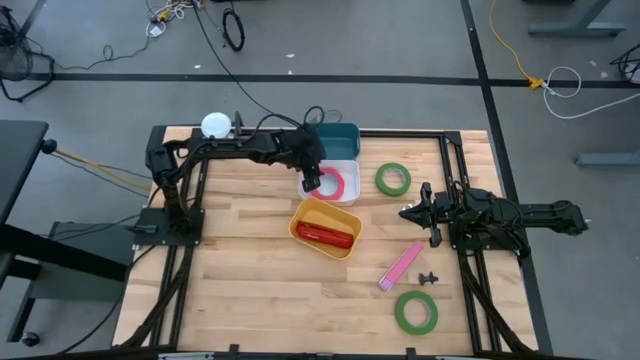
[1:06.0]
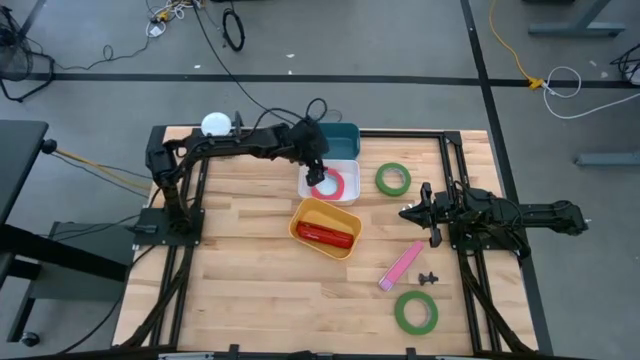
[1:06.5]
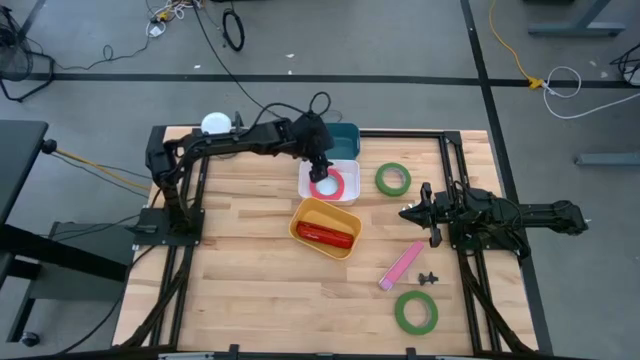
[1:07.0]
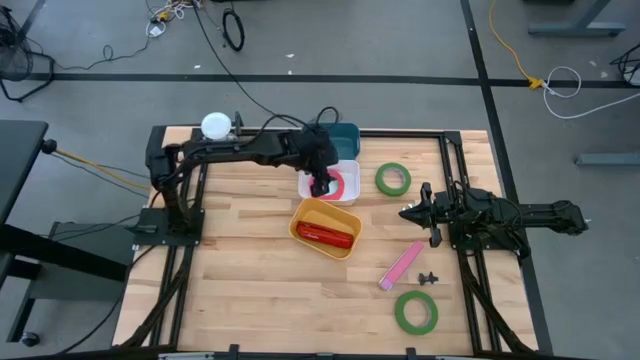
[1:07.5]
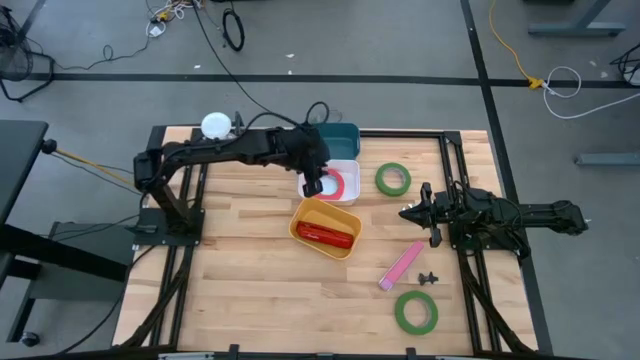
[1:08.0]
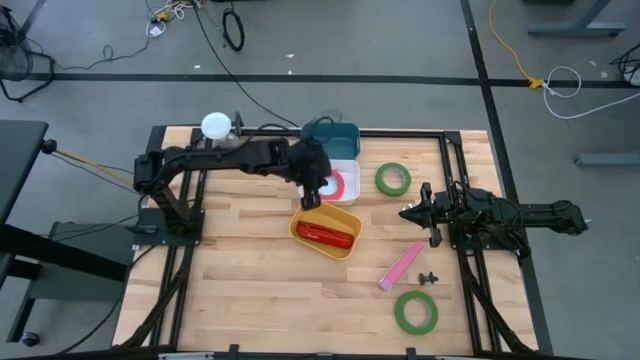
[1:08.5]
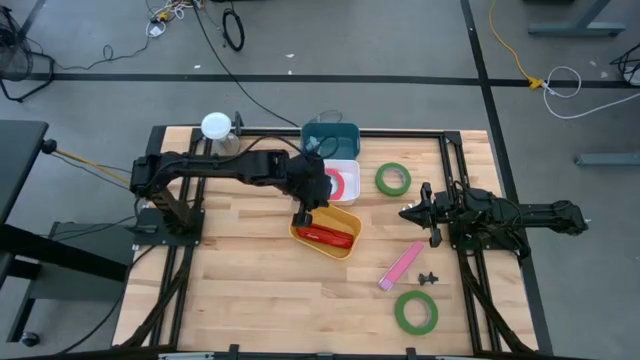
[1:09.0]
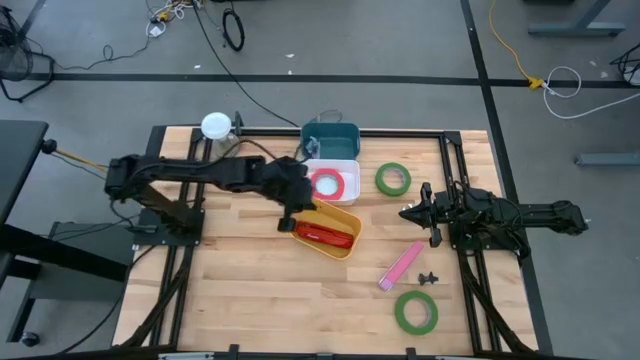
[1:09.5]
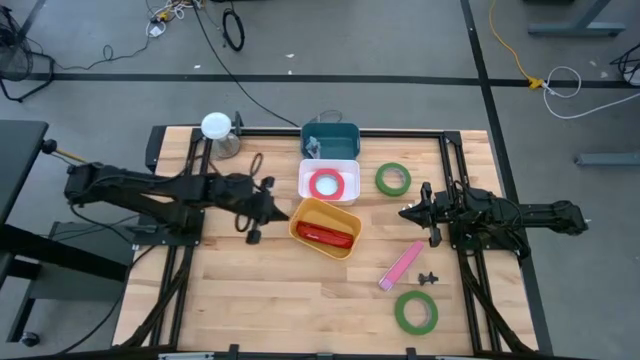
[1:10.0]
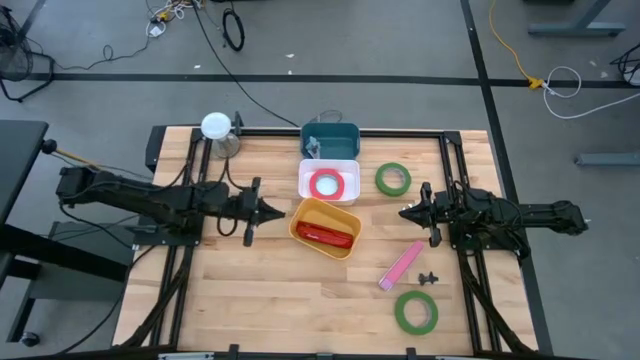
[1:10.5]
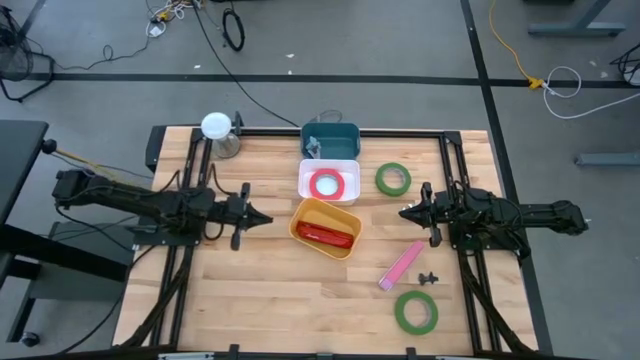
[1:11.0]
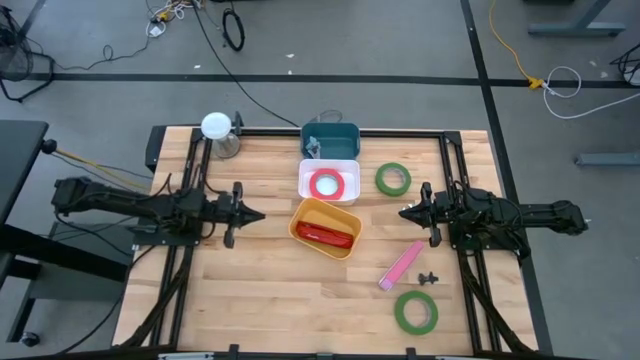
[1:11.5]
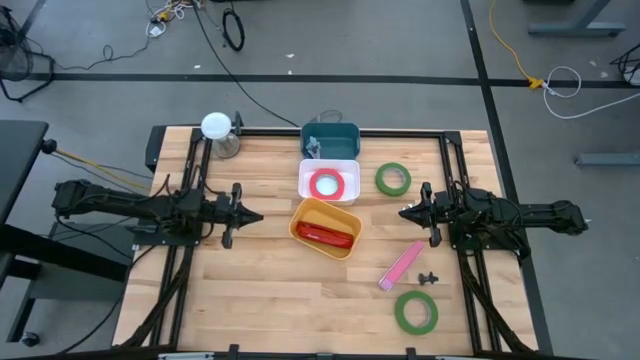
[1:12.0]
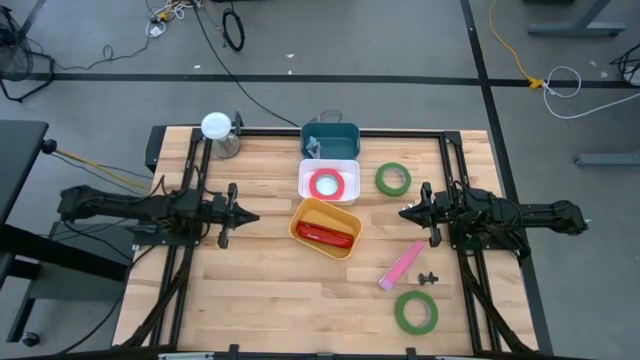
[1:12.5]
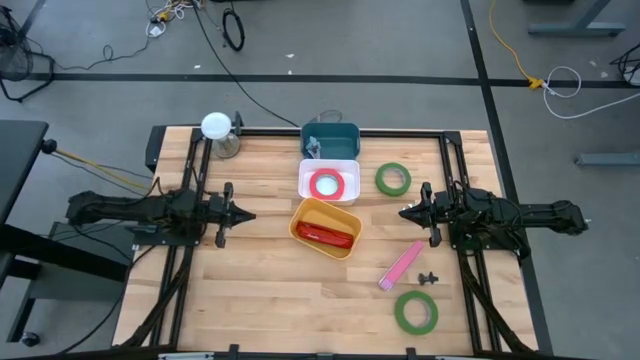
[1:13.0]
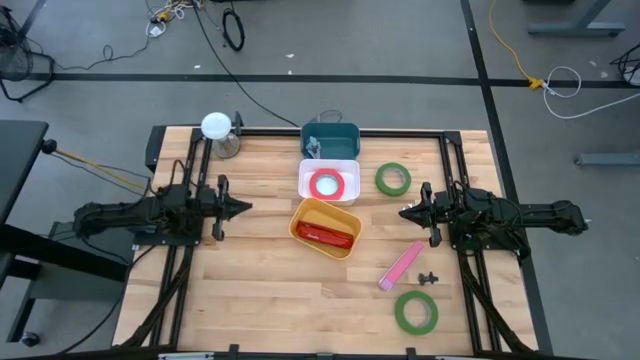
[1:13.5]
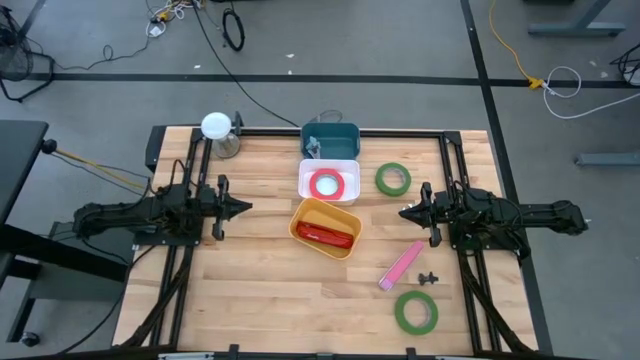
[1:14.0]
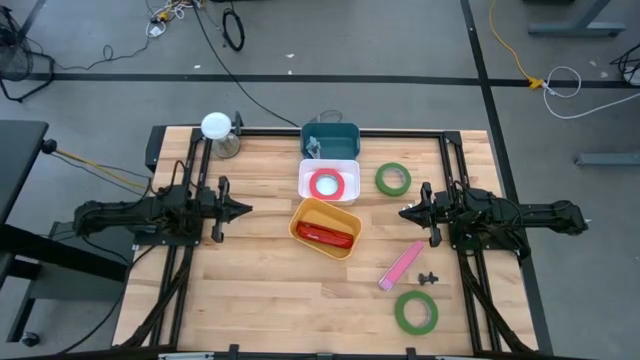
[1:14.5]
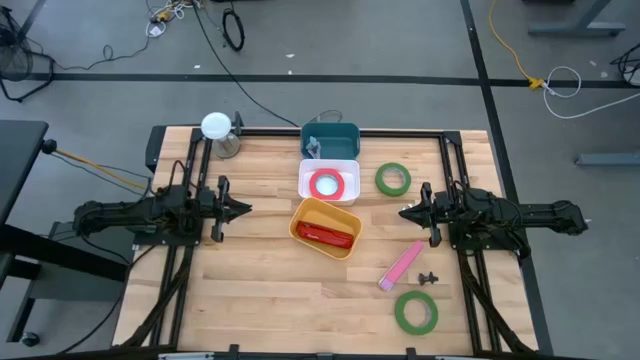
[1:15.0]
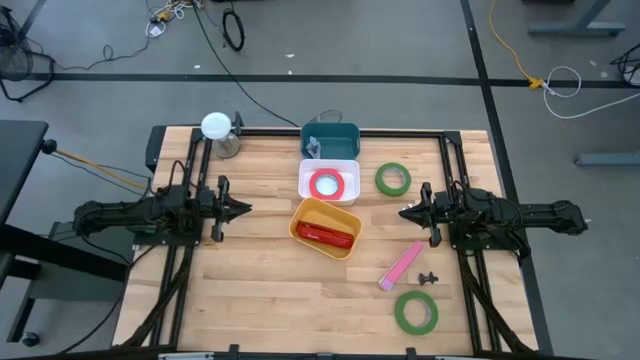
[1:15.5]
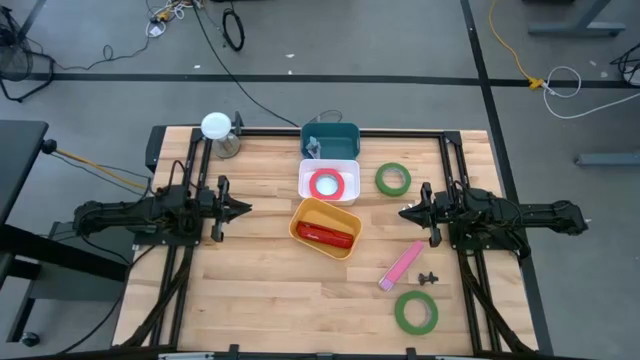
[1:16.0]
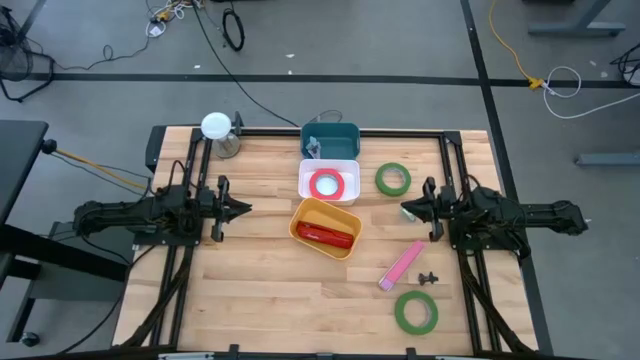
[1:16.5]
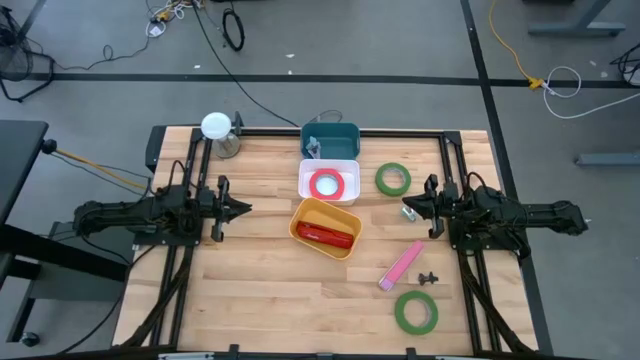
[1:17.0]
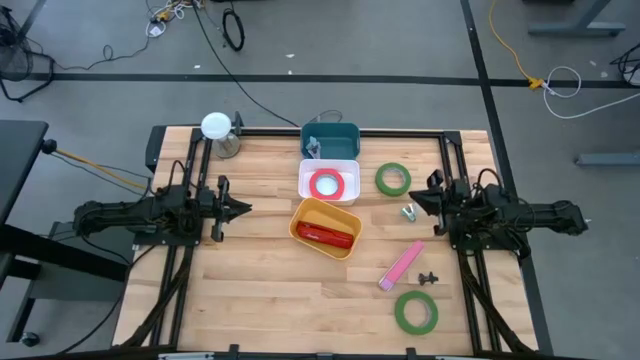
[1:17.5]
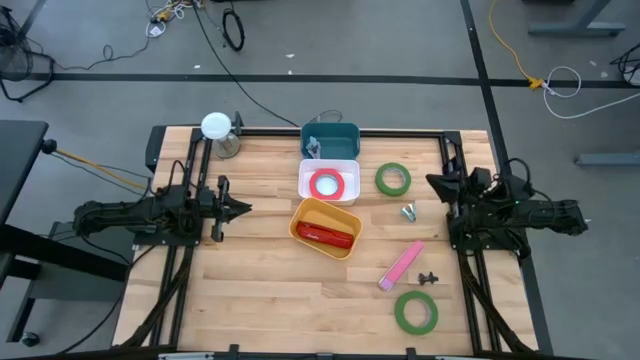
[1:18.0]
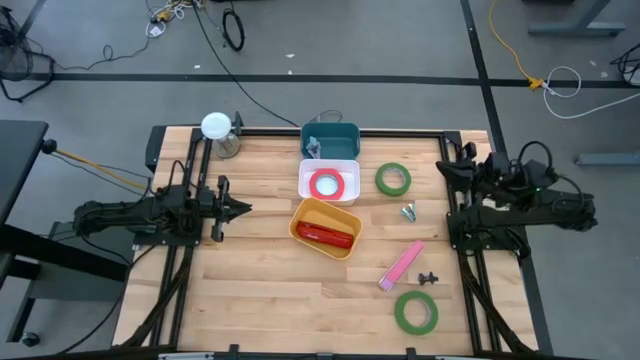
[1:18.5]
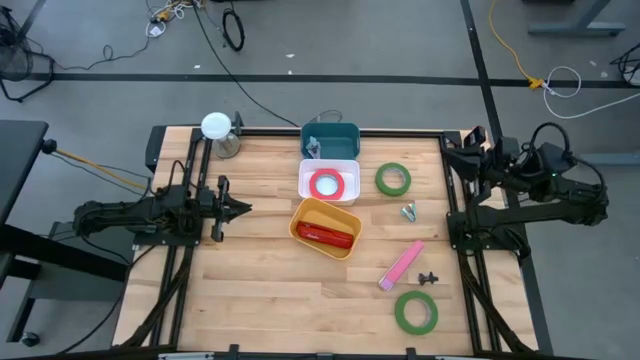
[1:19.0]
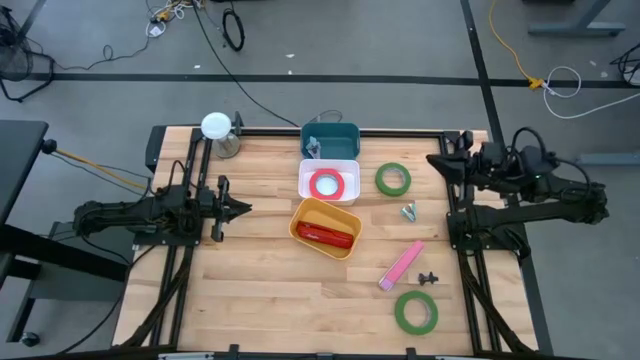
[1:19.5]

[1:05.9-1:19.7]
Task: Pick and place Stapler, Stapler remover, tape
Put the top green tape into the white bin
